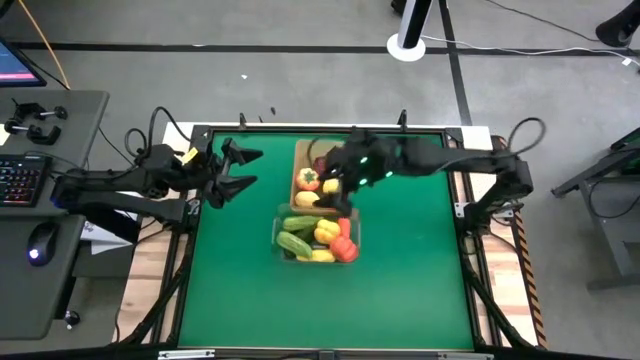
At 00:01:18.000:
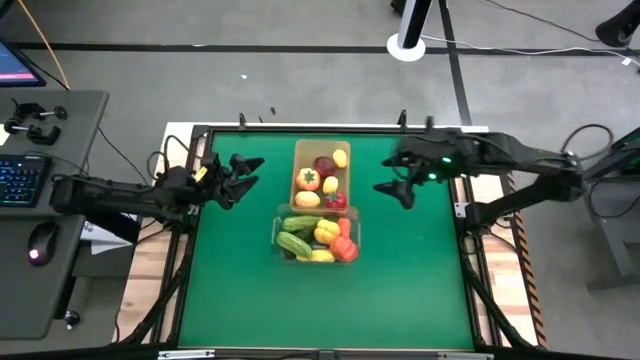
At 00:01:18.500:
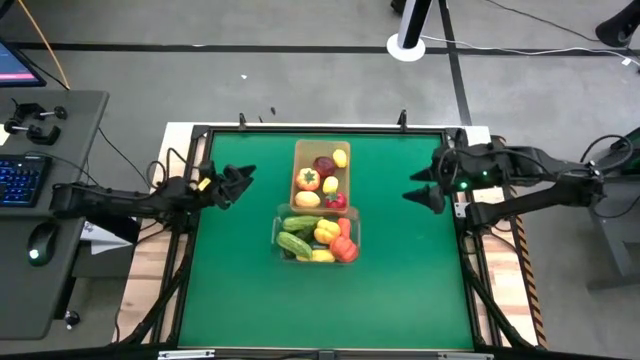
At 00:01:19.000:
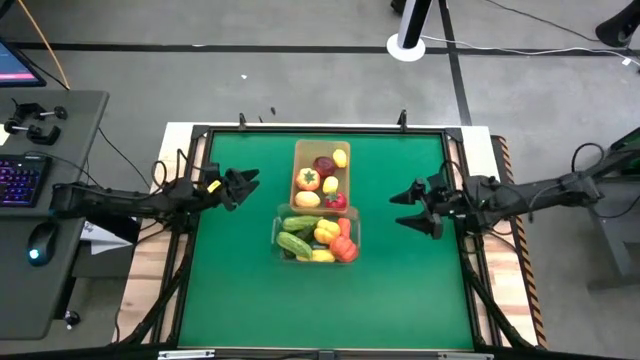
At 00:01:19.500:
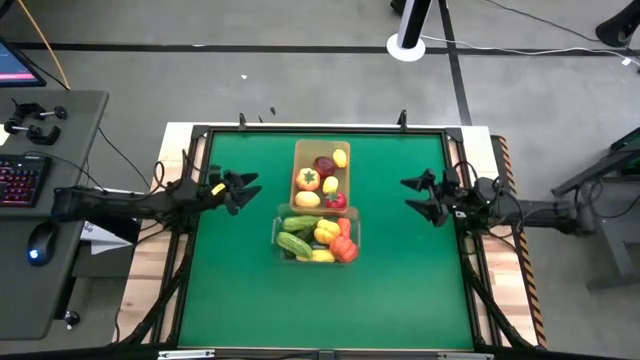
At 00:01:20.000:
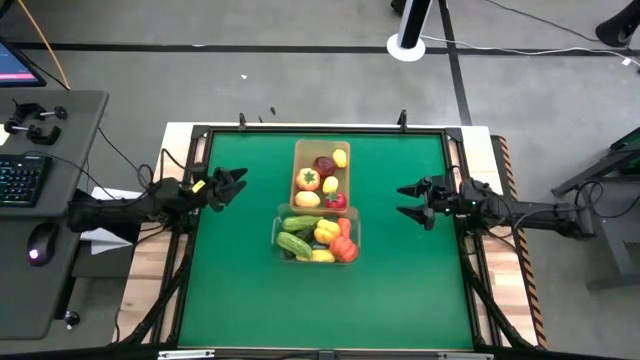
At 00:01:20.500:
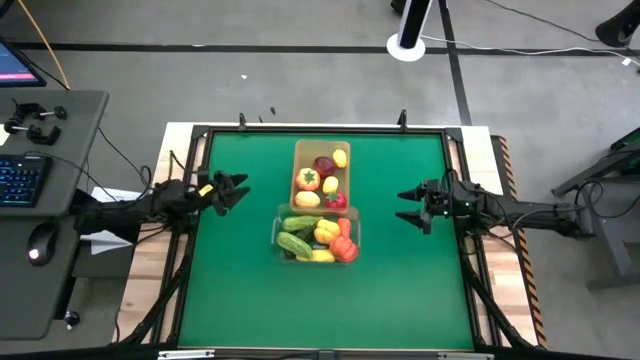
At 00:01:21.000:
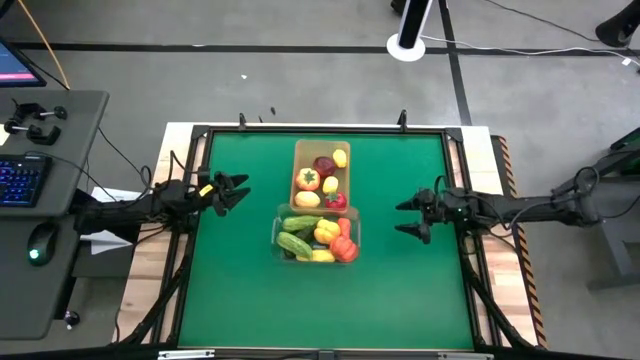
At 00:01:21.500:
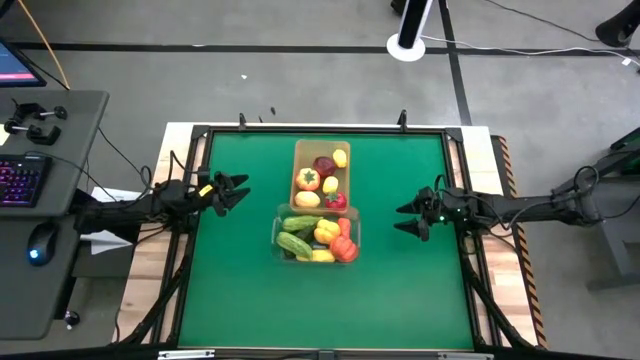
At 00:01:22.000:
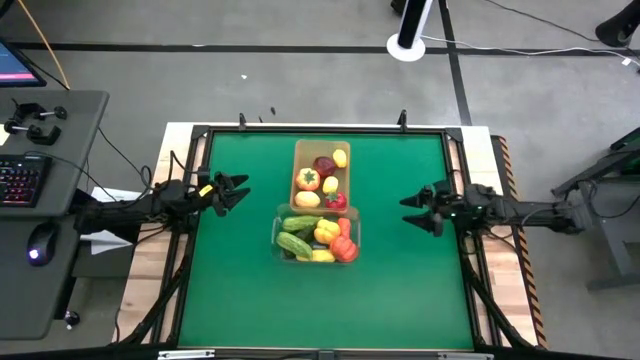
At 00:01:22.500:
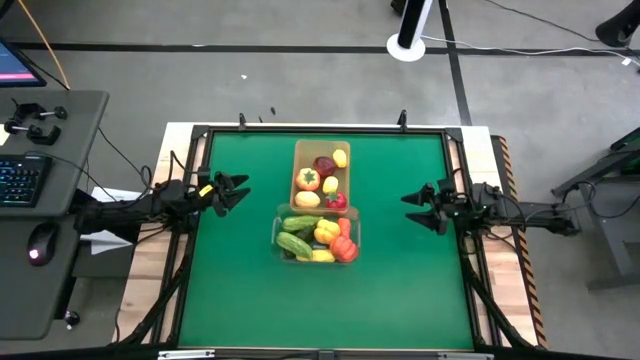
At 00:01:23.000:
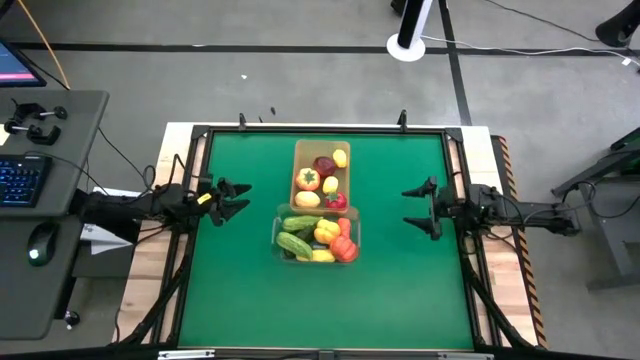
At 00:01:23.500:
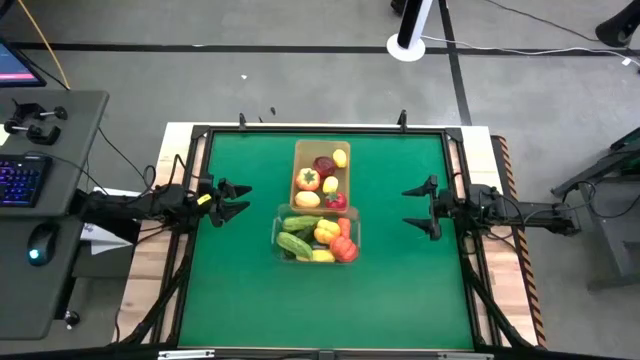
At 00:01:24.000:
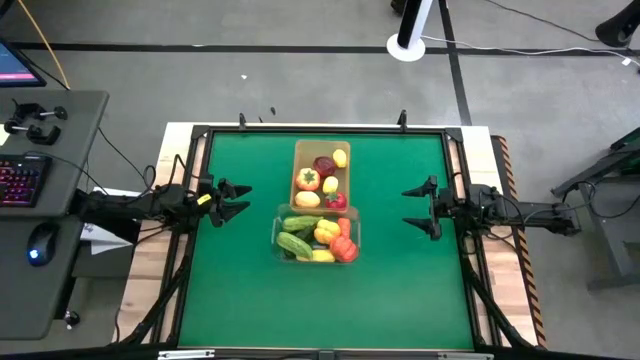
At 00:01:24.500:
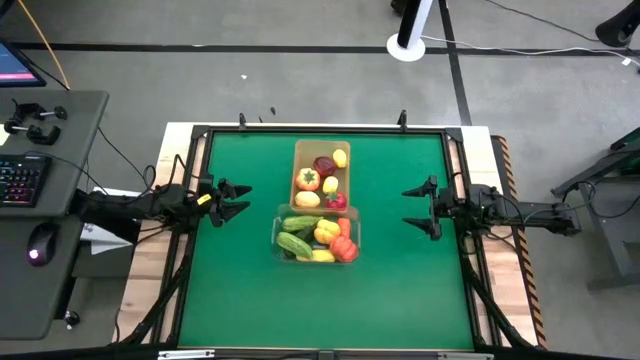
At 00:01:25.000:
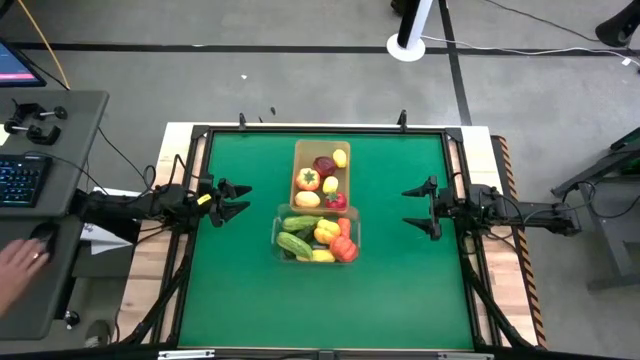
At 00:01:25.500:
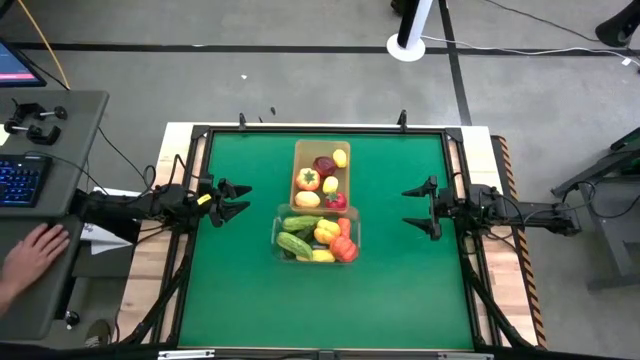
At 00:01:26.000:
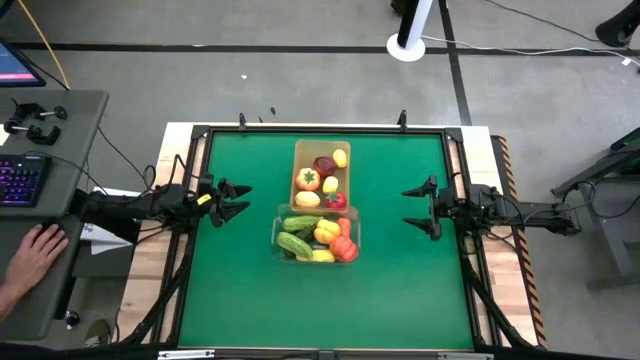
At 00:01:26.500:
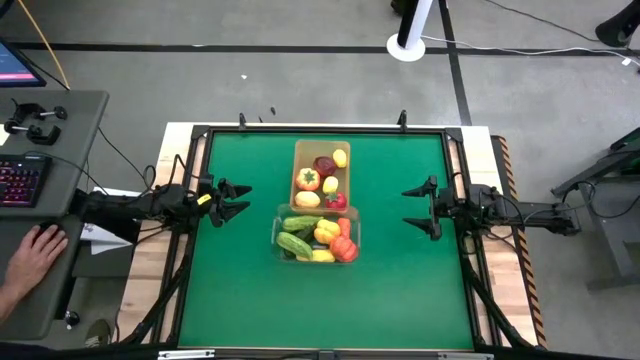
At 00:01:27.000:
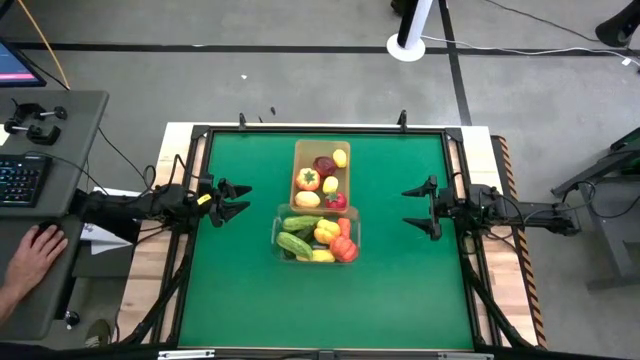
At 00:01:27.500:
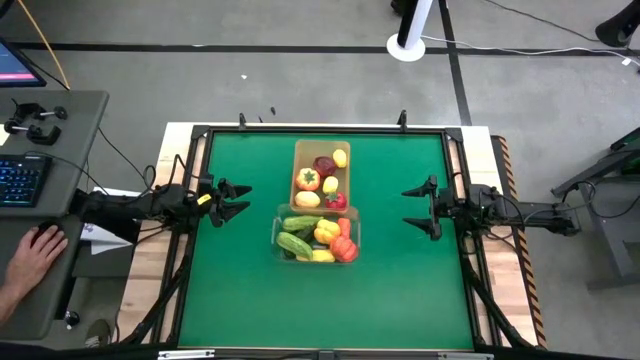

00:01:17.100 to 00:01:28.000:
Task: Sort produce into baskets
Return to Home Position

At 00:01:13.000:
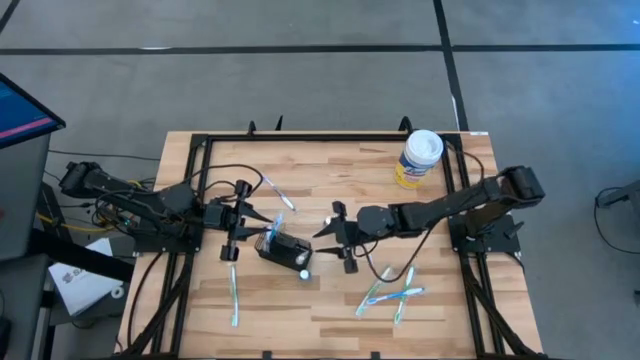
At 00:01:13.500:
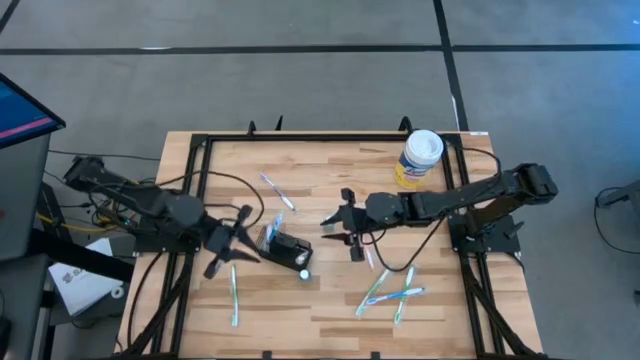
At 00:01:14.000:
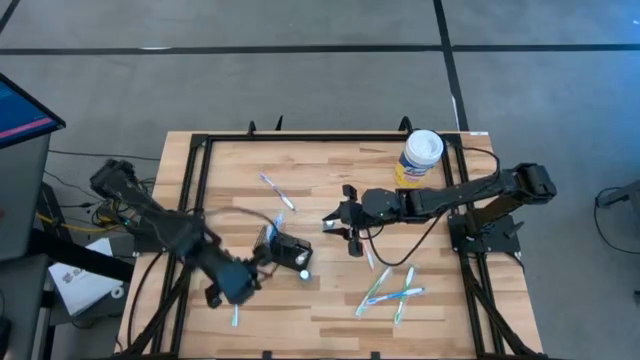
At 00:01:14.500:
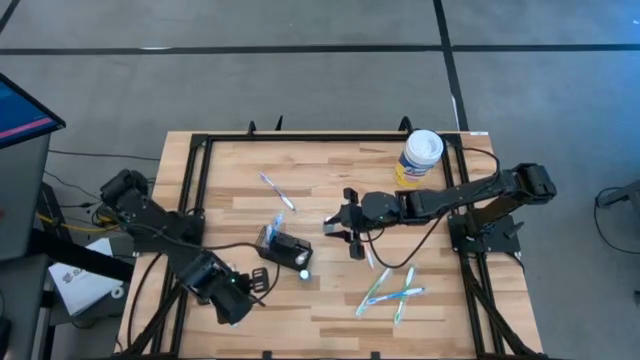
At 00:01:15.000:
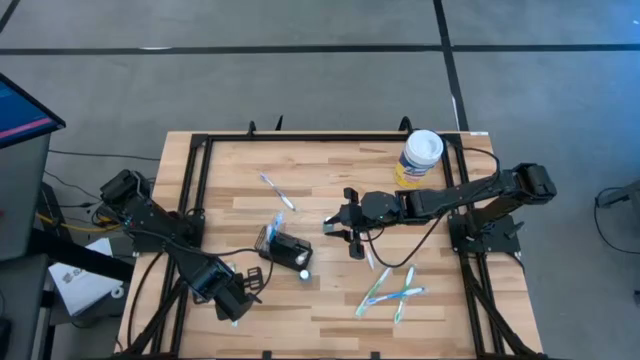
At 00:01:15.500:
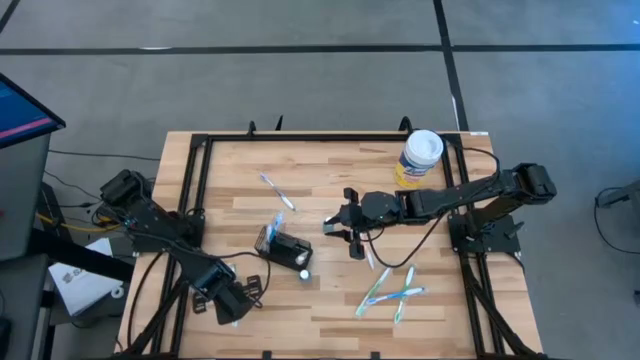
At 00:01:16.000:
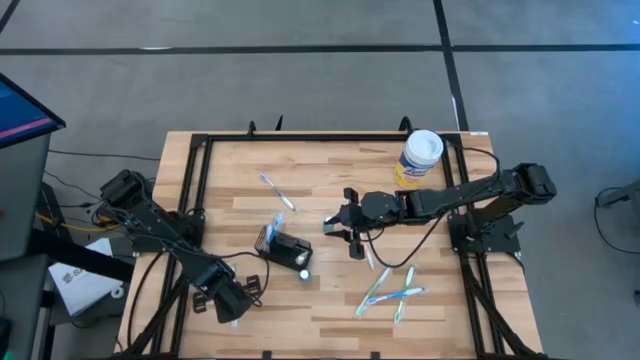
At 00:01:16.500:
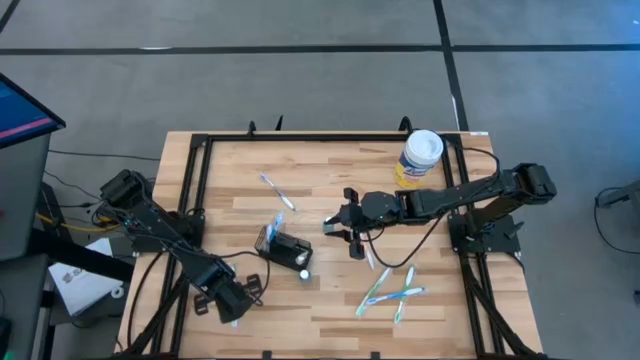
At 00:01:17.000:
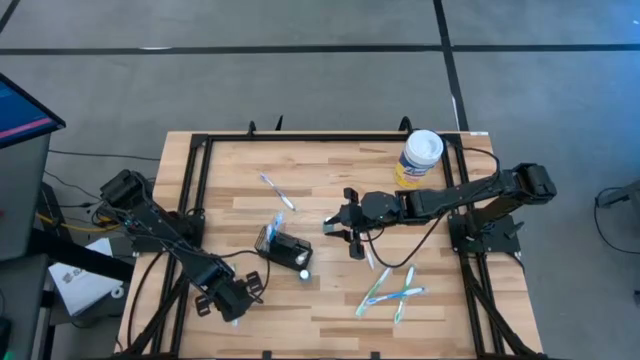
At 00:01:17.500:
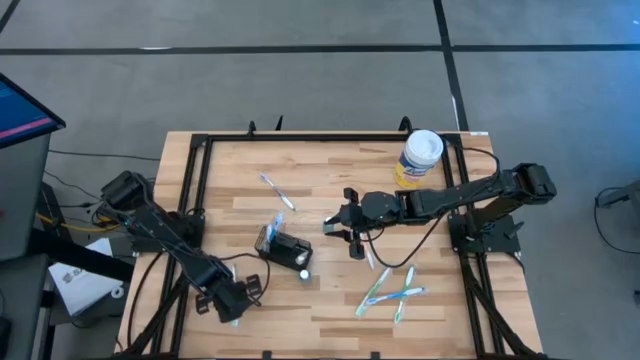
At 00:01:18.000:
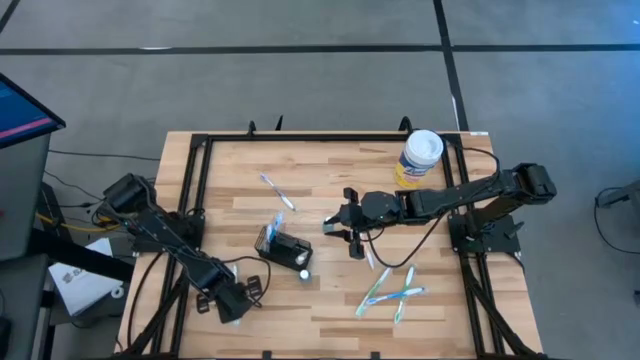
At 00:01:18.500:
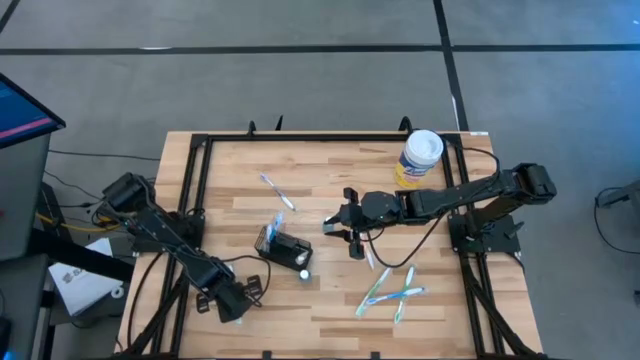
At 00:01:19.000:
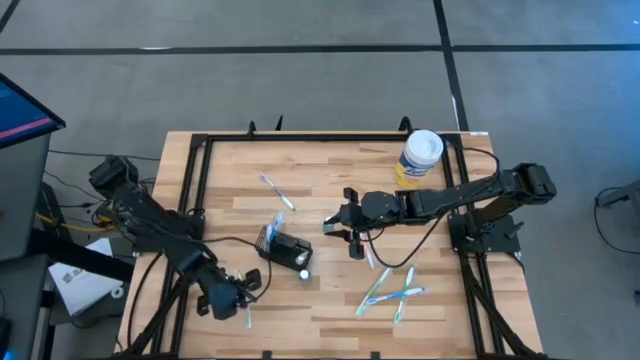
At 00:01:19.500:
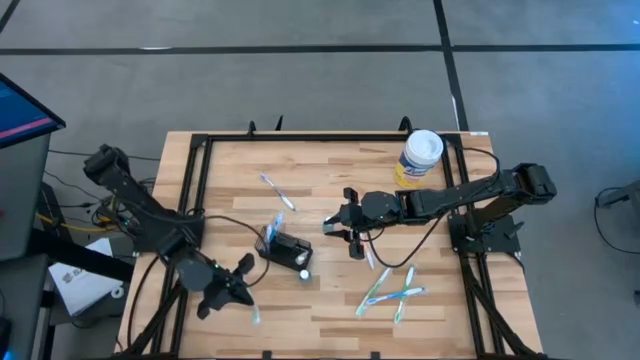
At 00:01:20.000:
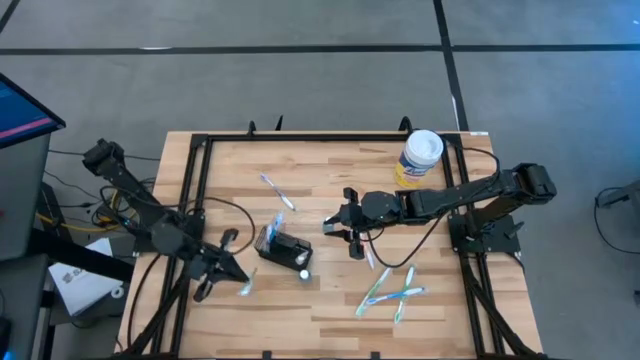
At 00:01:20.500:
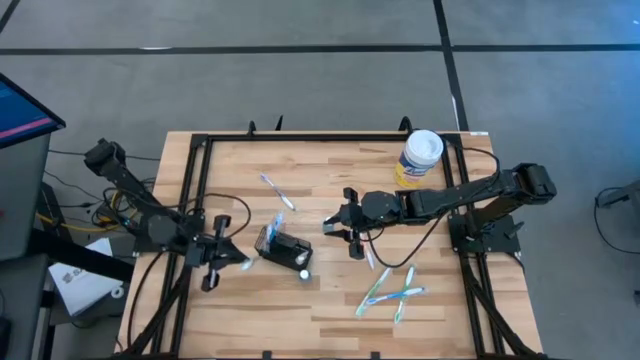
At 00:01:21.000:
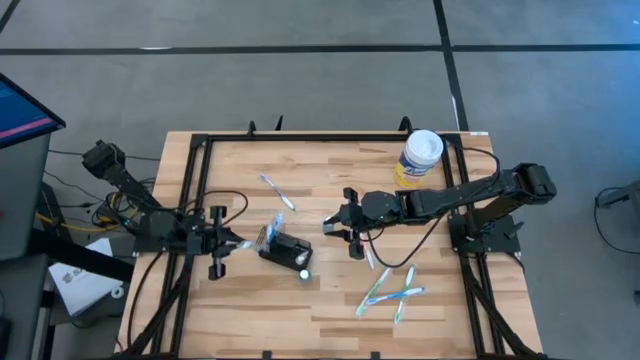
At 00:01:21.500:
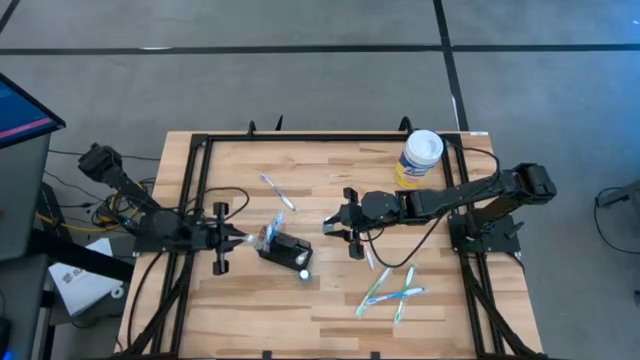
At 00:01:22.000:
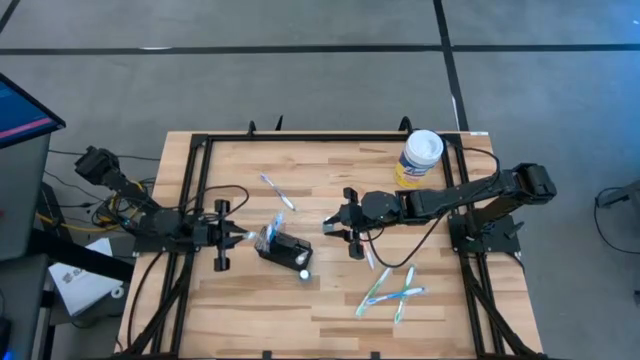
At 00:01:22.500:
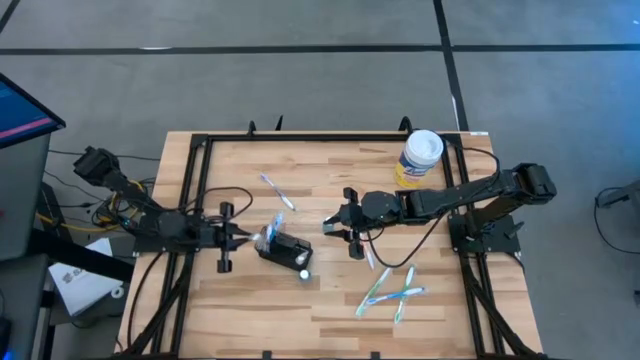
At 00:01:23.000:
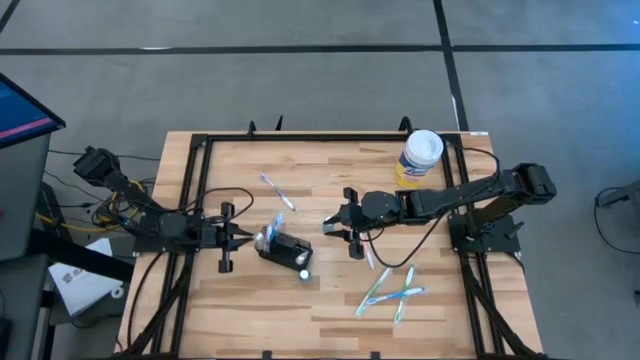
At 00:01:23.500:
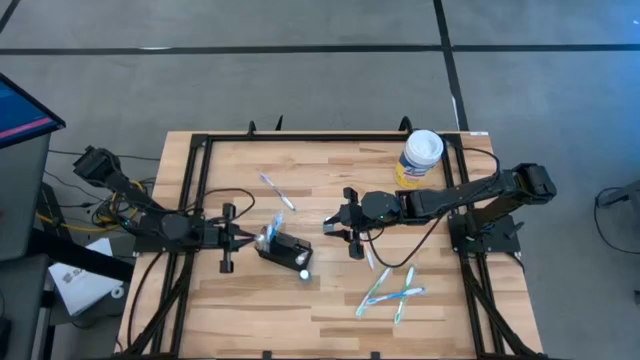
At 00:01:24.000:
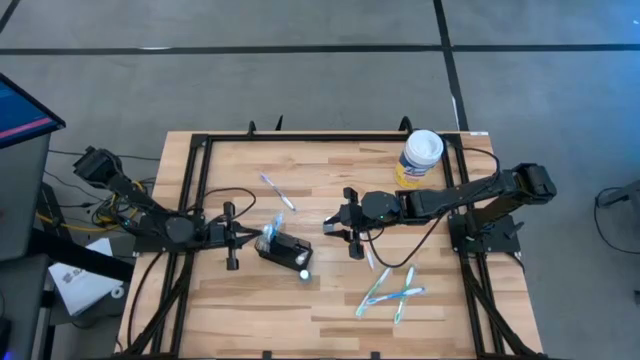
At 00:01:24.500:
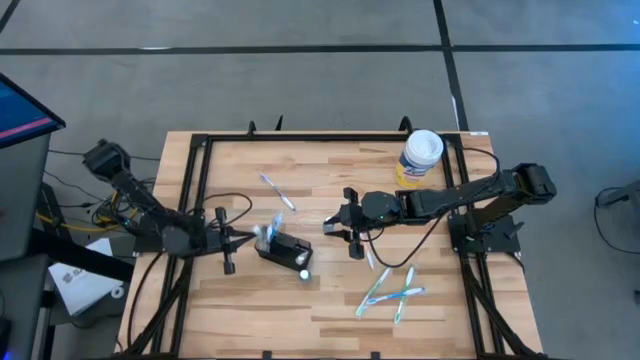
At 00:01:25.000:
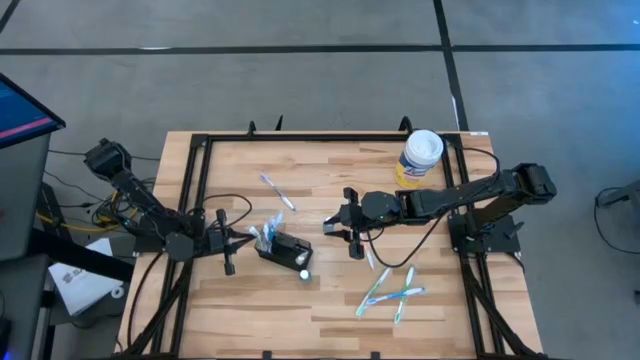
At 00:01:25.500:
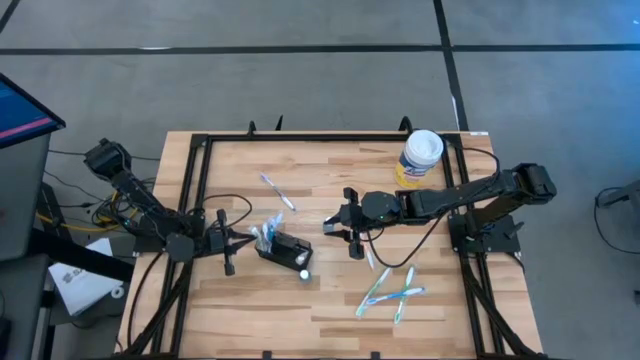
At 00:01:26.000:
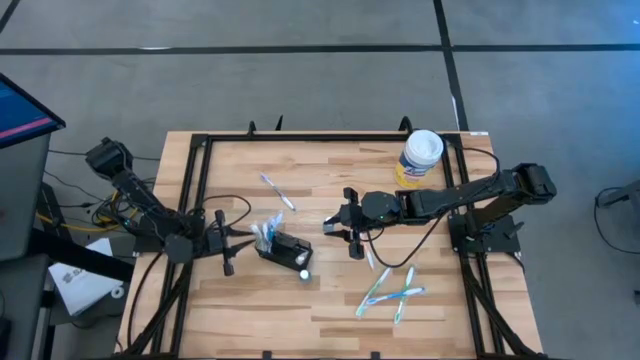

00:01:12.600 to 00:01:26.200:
Task: Pick & Place toothbrushing station
Put the left green toothbrush into the left compartment of the wire organizer
